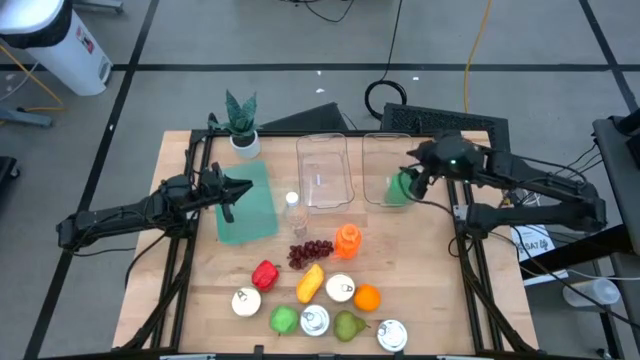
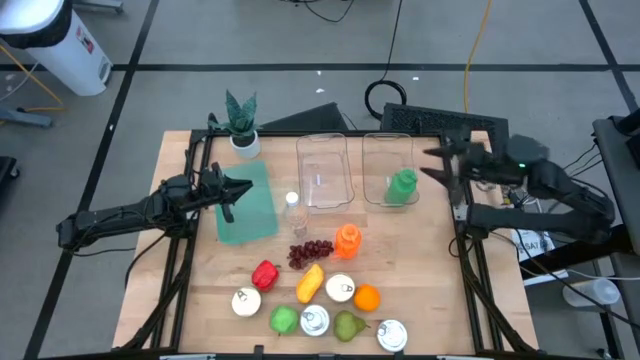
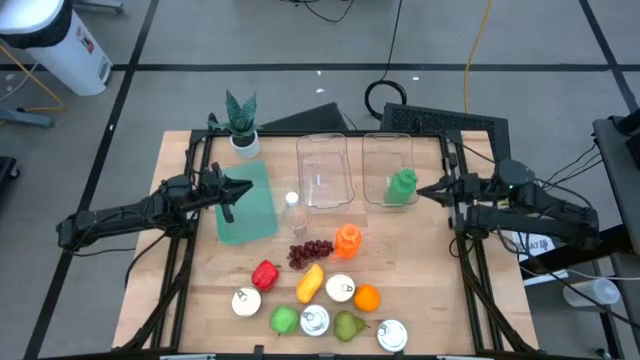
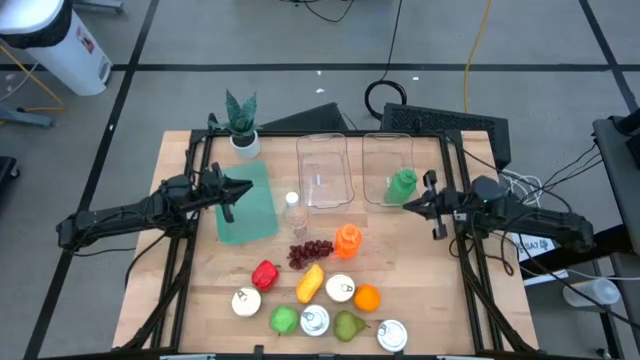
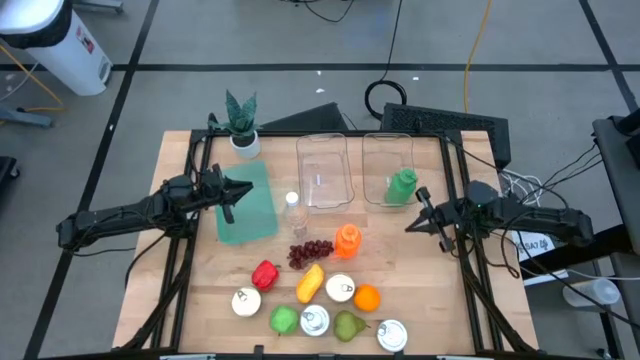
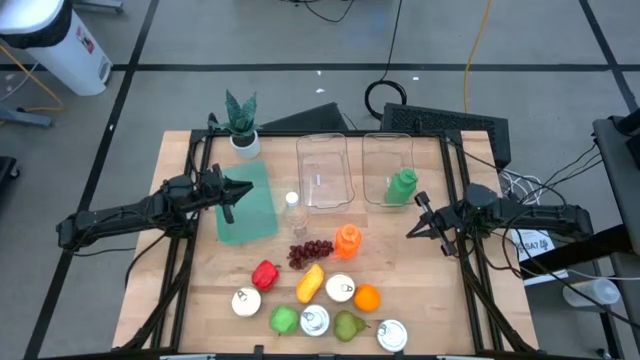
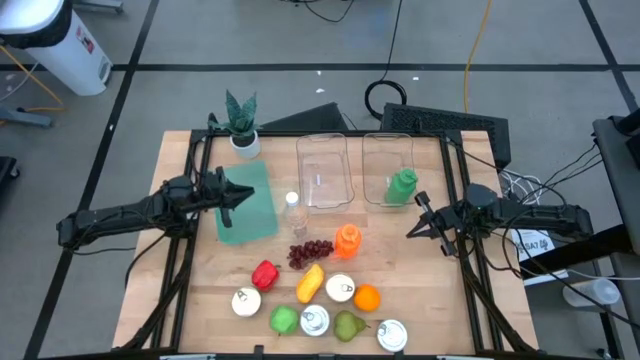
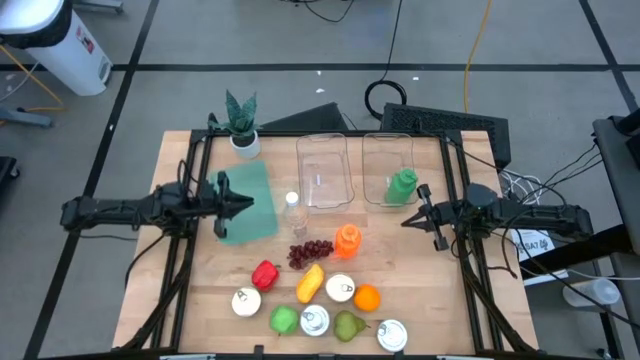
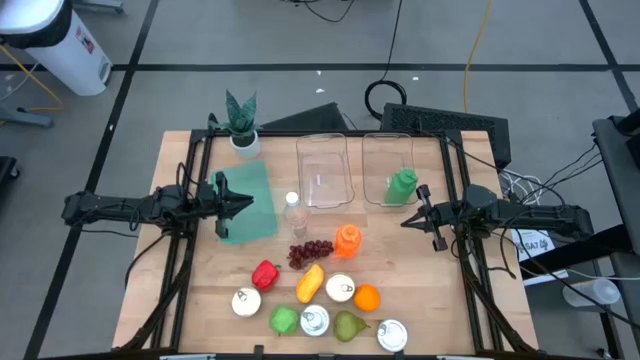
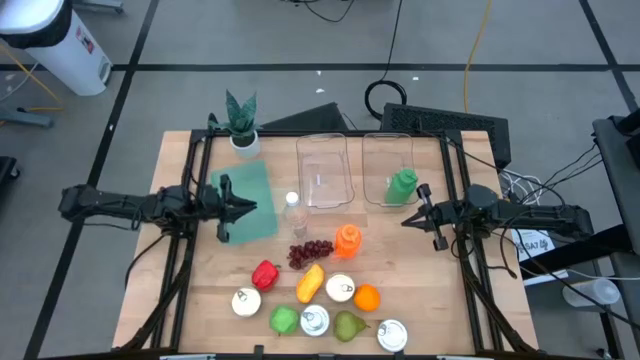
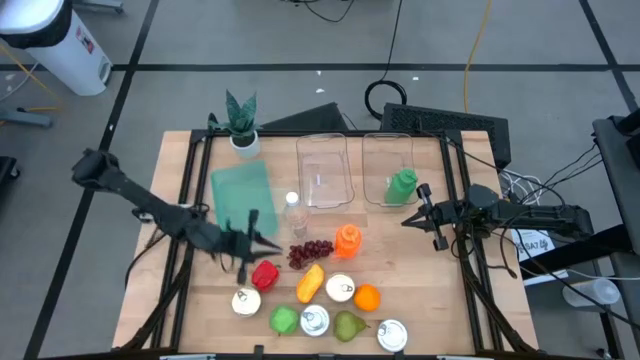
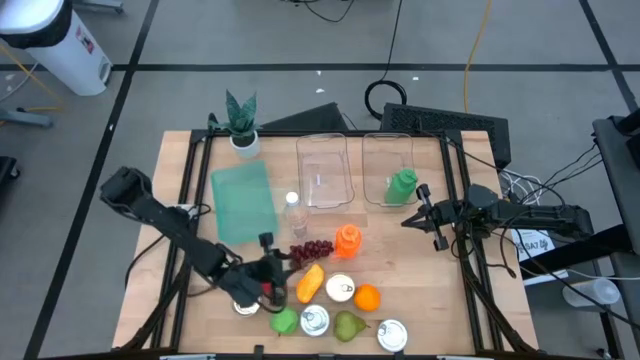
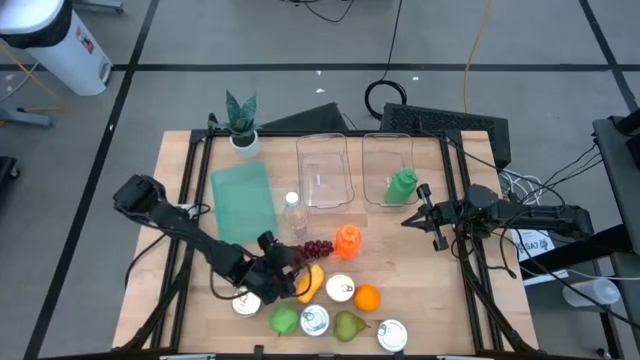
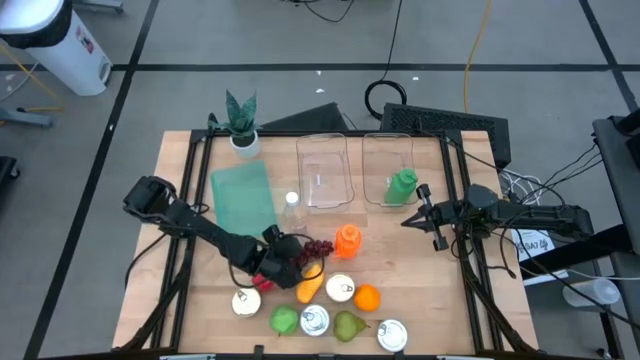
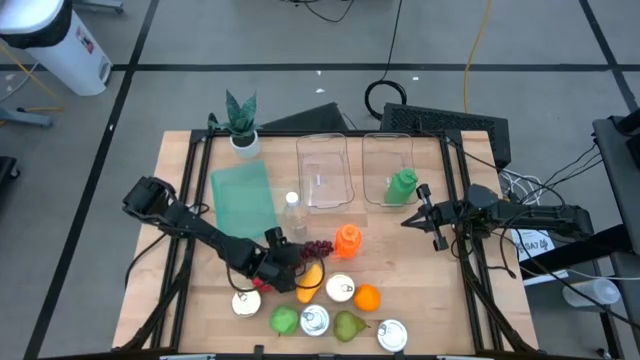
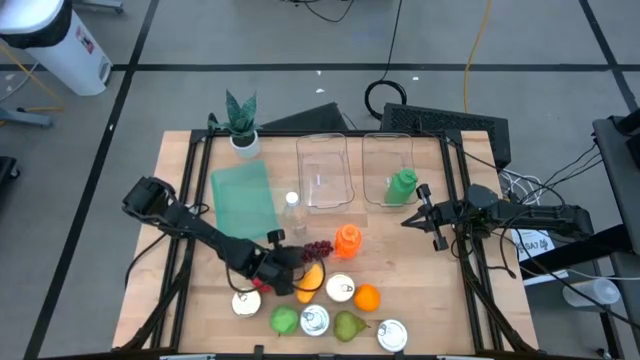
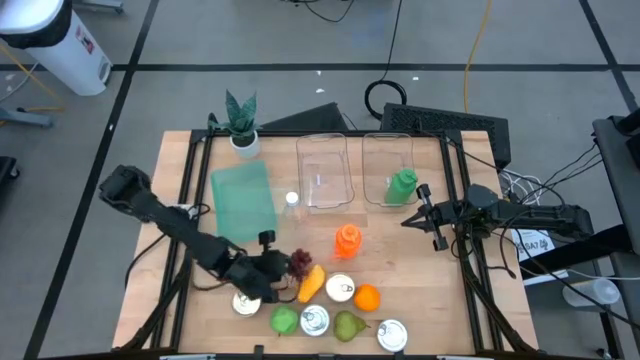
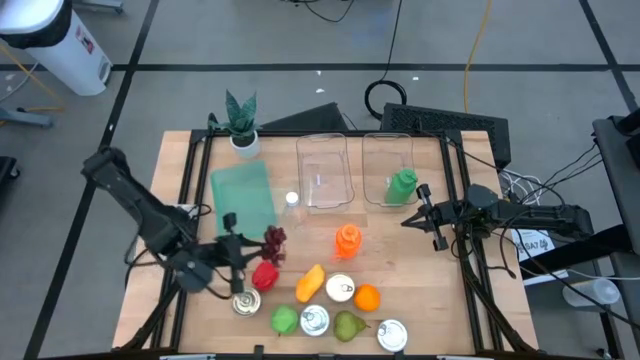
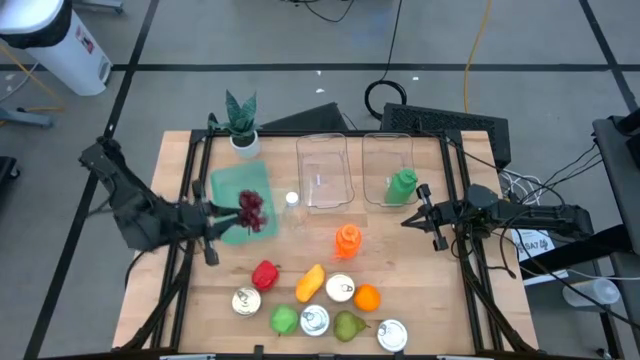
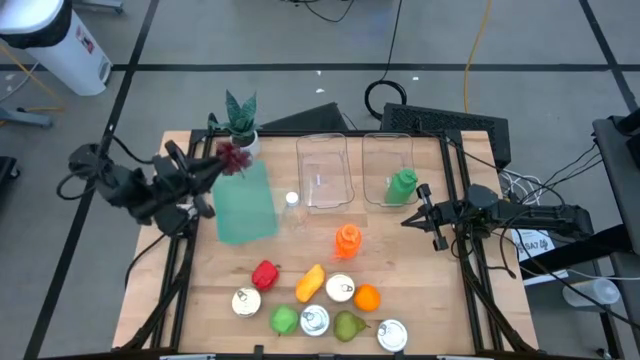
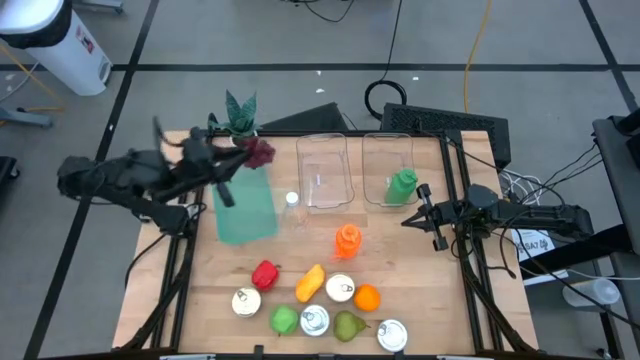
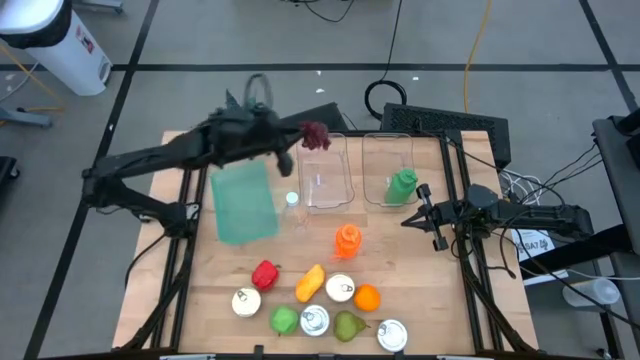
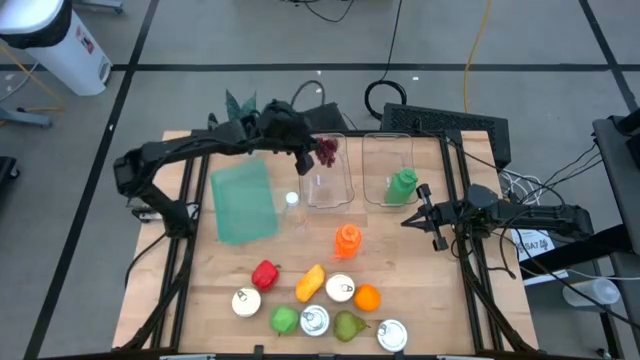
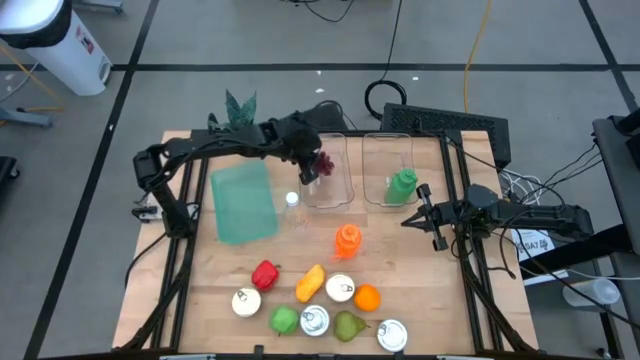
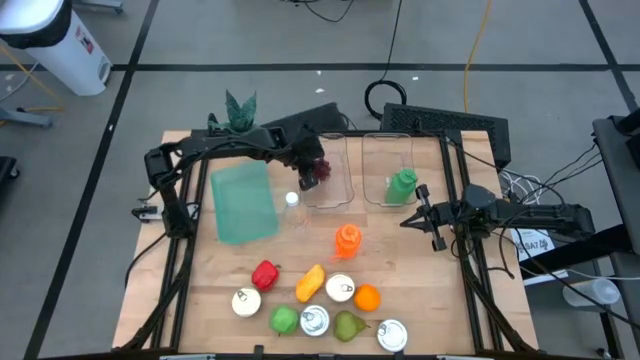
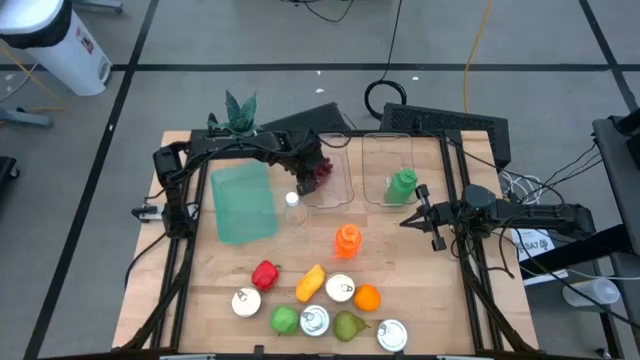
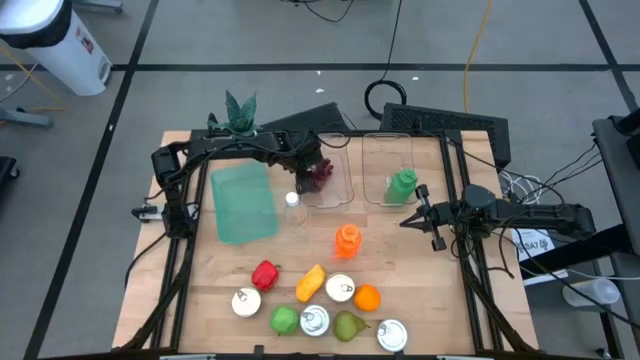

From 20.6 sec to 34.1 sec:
Task: Pick & Place Food Item
Put the grapes into the left transparent bin

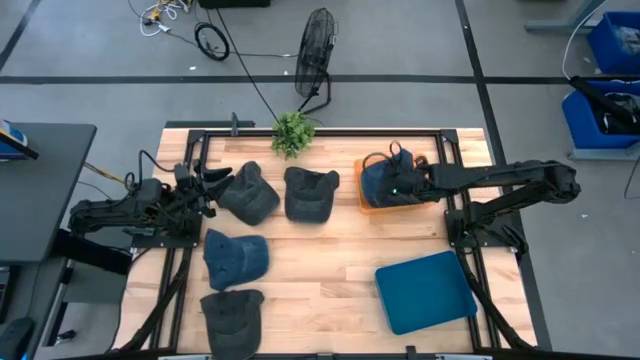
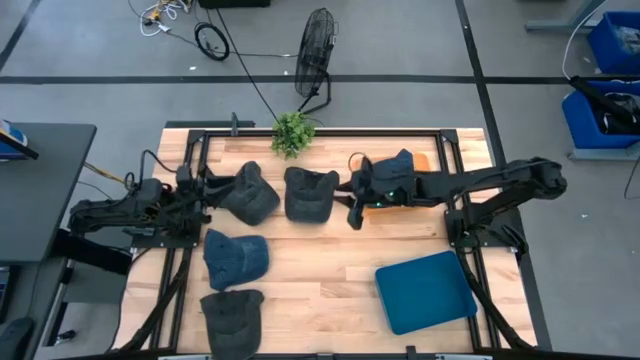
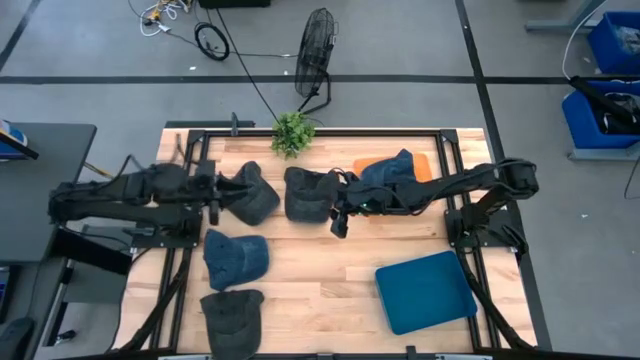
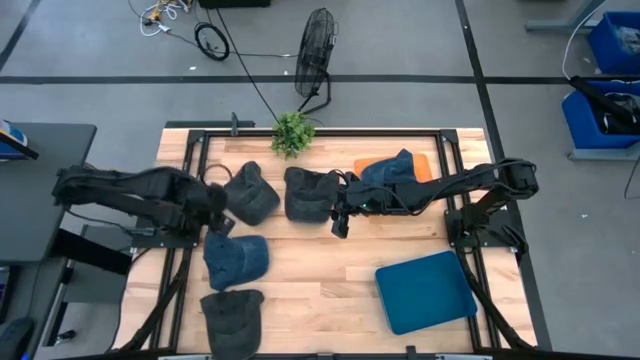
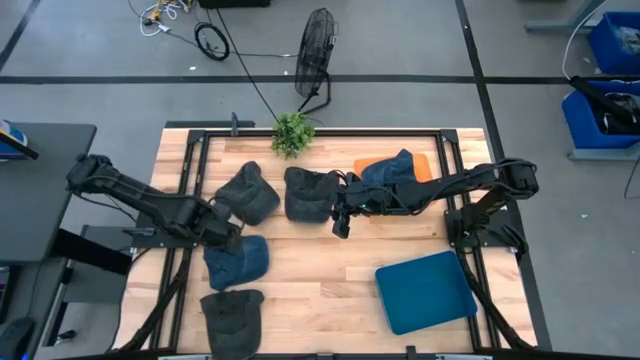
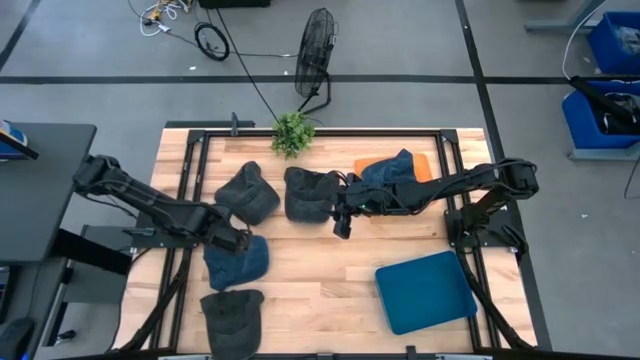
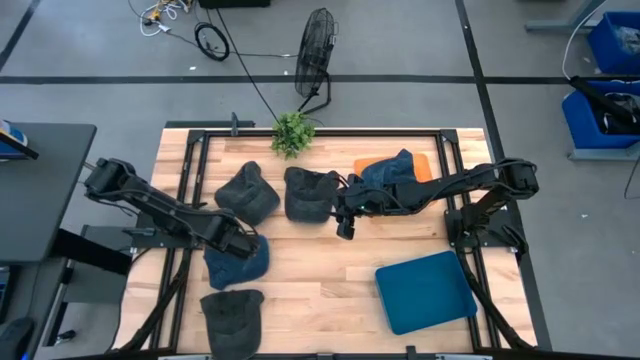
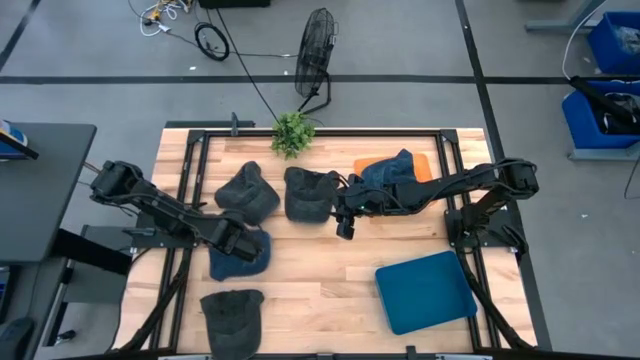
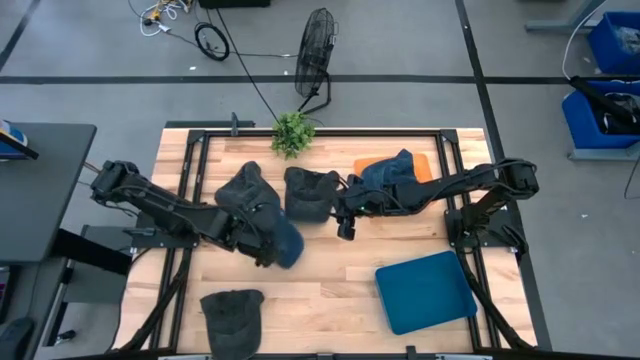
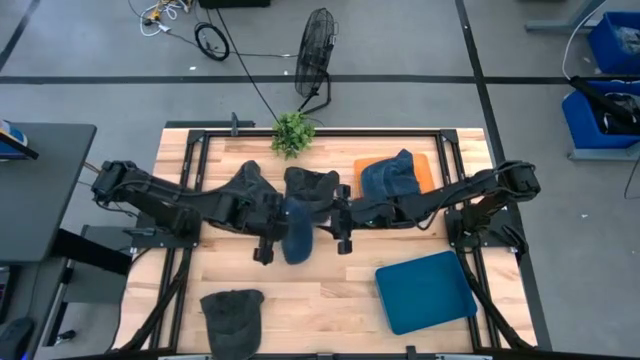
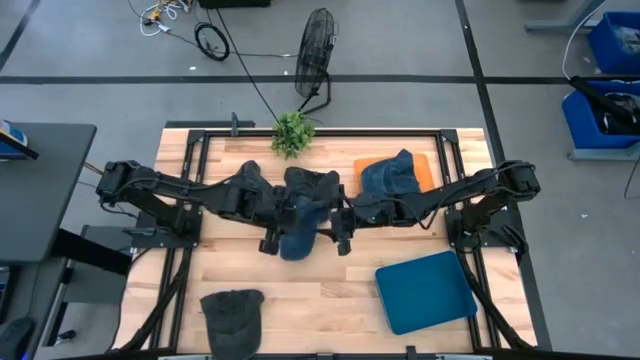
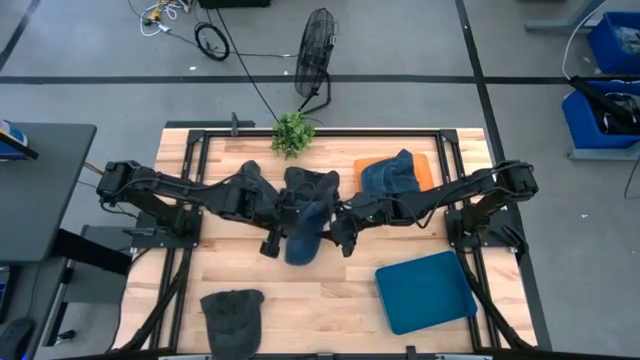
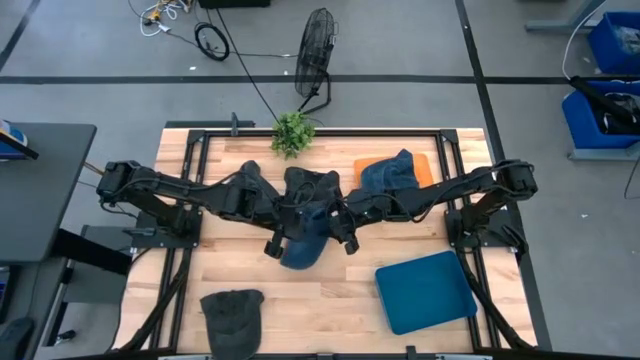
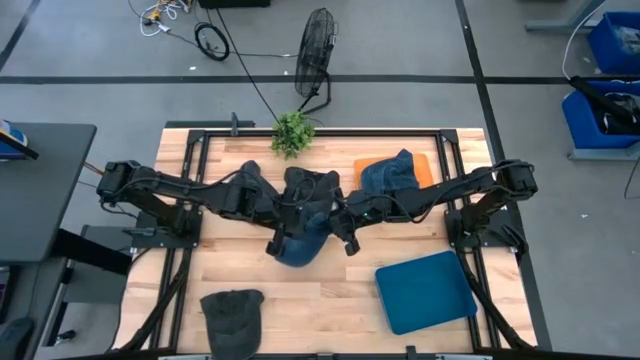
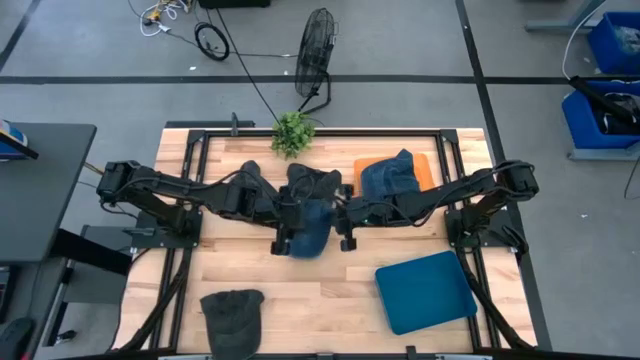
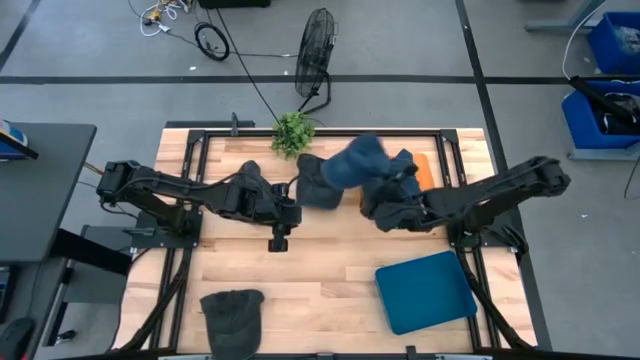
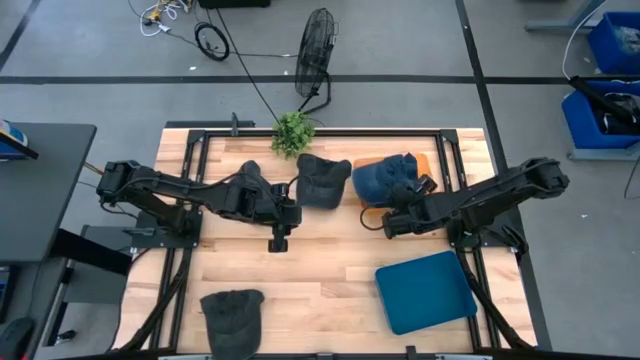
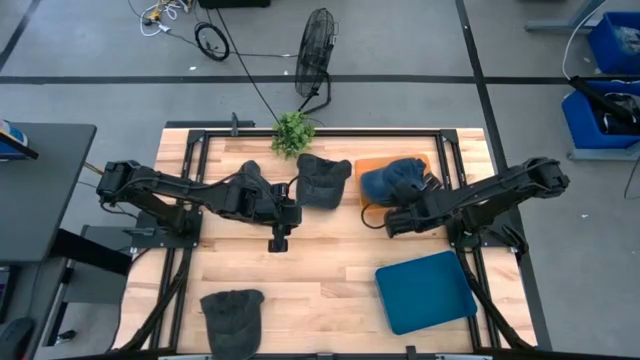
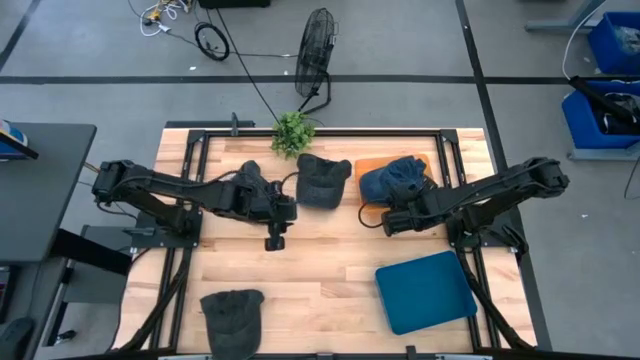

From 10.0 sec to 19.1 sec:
Task: Pick & Place hat
Put the blue cap into the orange bin
